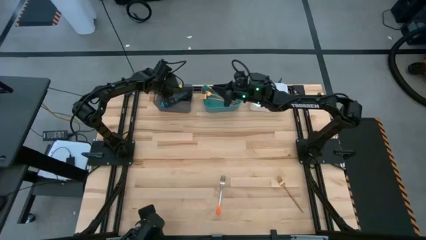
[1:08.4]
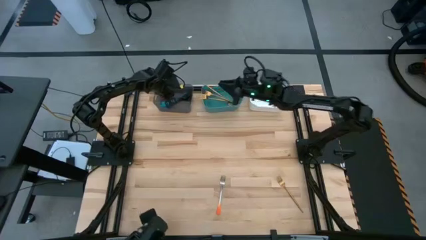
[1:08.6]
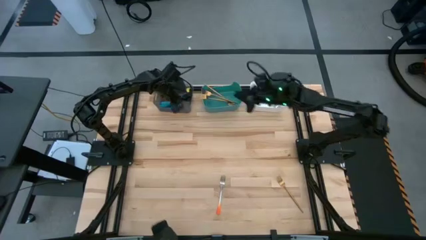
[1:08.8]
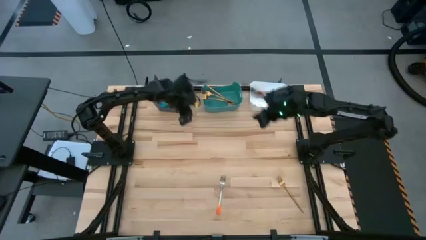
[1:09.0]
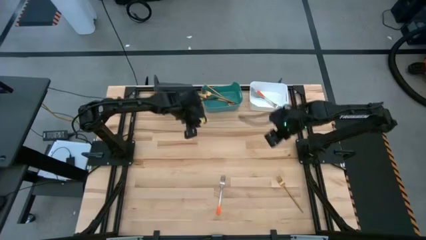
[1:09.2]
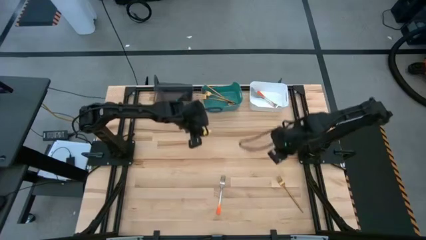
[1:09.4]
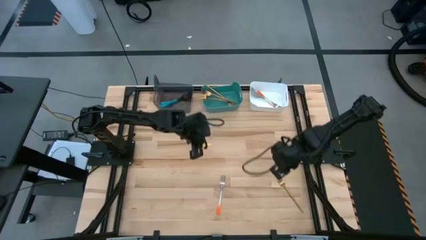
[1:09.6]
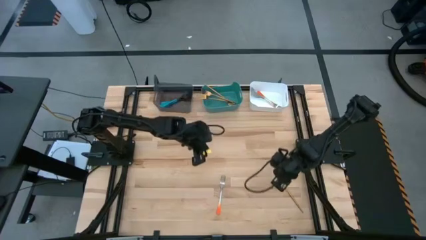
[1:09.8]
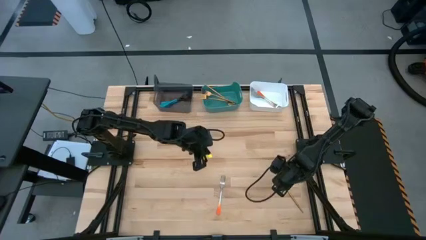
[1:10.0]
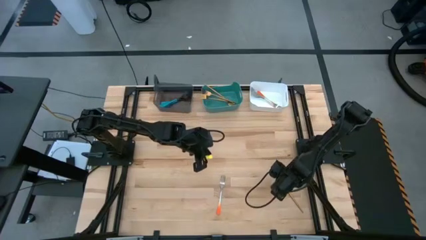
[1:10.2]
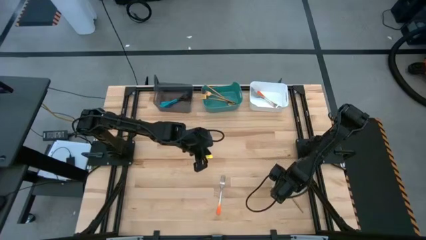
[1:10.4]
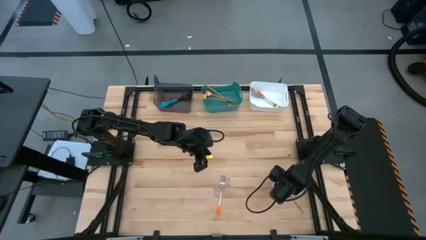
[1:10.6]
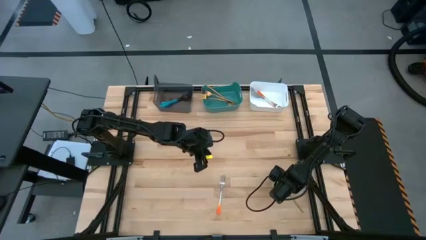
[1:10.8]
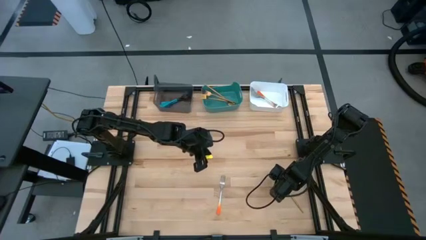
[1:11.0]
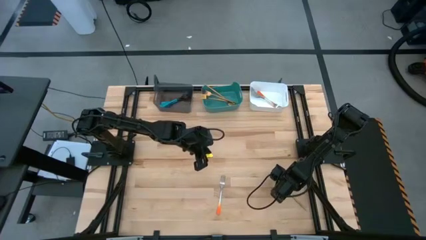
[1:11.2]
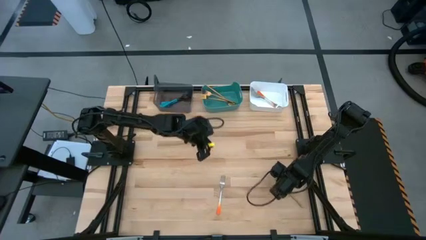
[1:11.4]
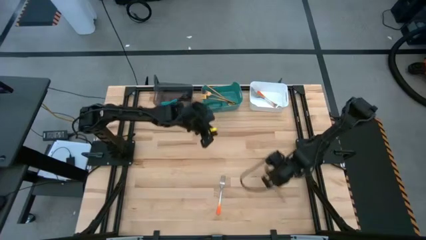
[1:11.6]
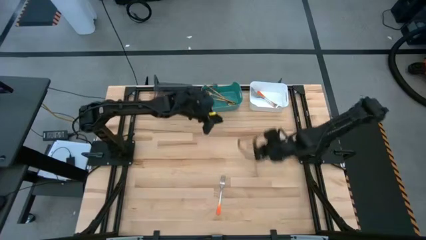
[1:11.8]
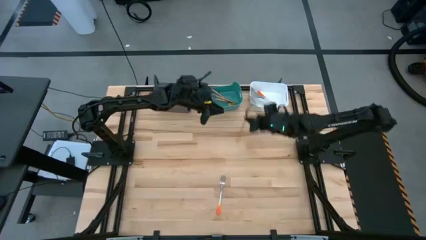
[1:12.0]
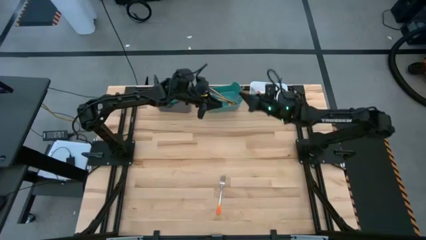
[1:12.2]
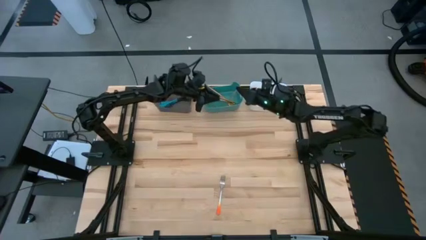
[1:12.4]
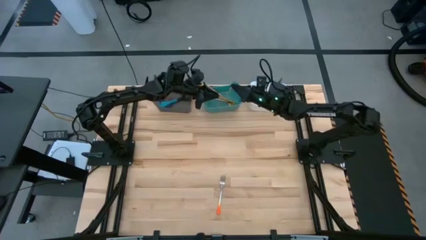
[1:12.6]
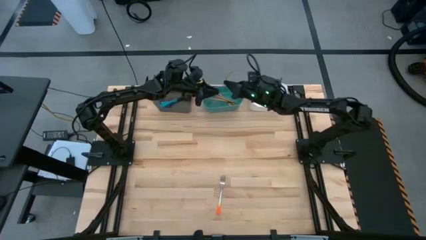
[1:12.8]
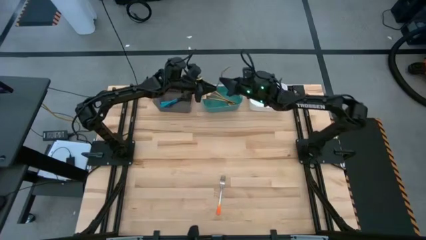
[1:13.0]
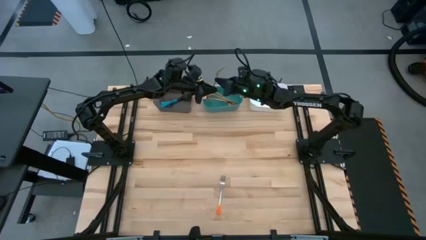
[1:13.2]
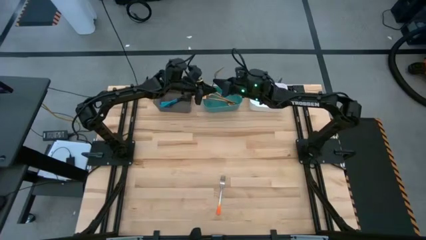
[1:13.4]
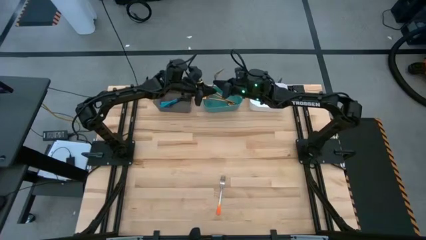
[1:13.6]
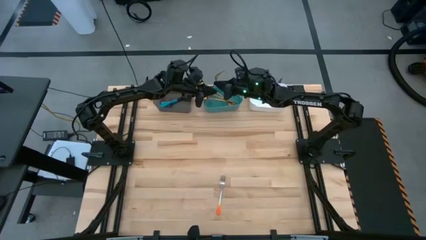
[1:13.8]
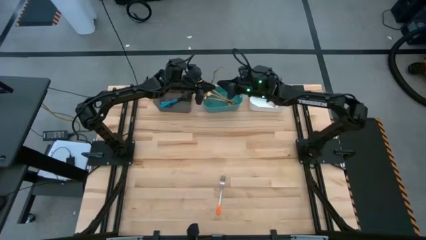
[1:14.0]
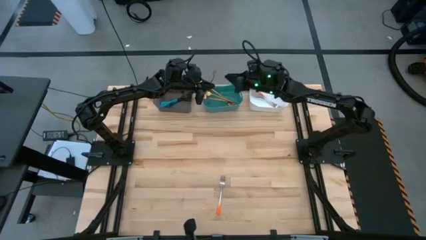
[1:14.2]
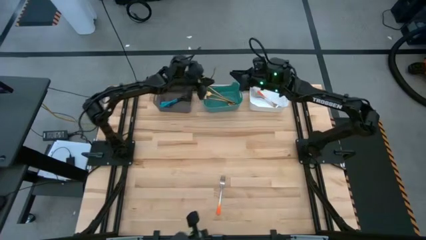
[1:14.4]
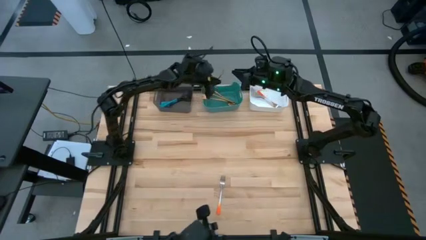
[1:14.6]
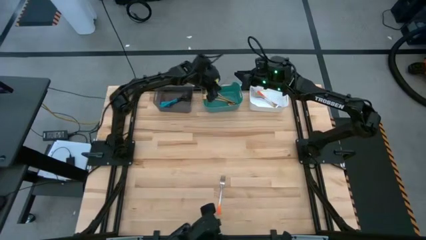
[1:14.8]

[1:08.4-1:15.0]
Task: Sort silverware by color (type)
Put the gold fork into the green bin

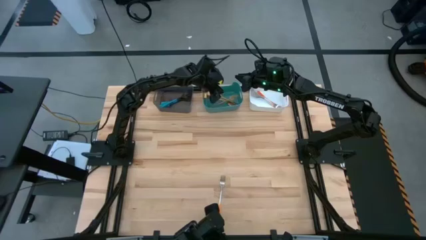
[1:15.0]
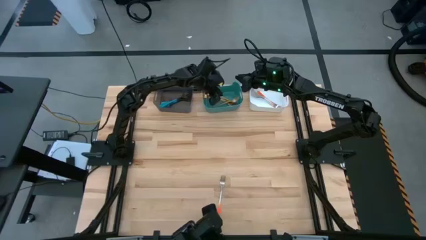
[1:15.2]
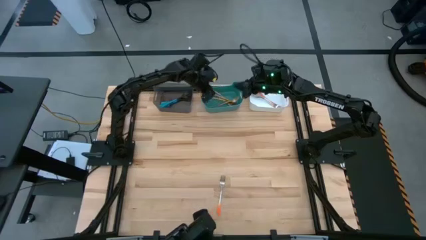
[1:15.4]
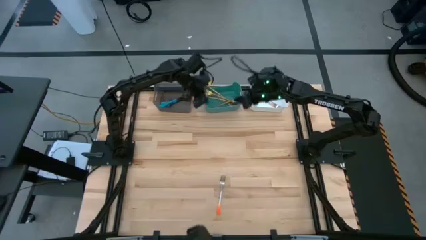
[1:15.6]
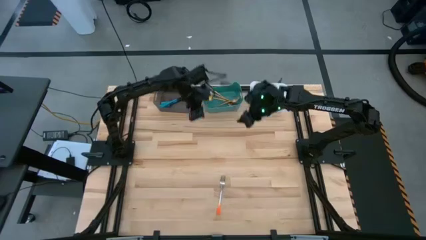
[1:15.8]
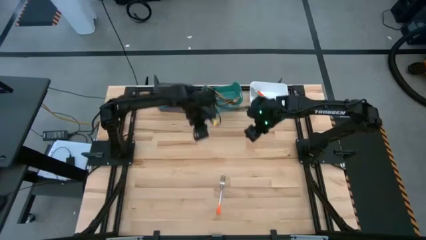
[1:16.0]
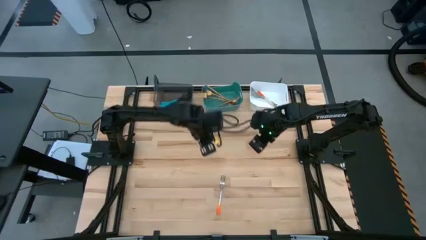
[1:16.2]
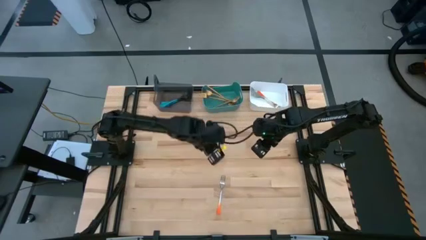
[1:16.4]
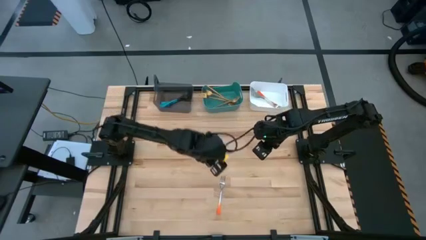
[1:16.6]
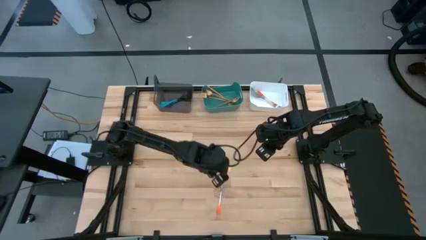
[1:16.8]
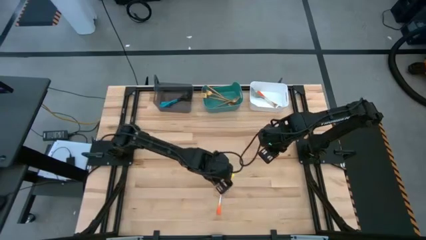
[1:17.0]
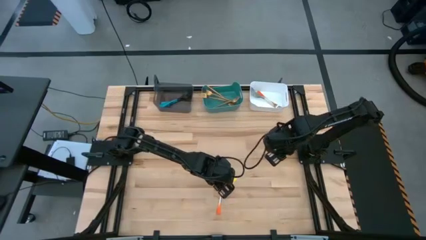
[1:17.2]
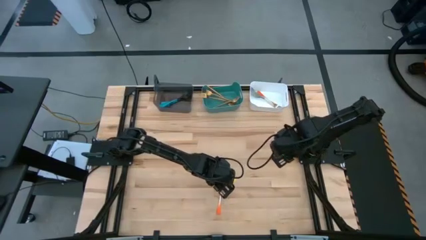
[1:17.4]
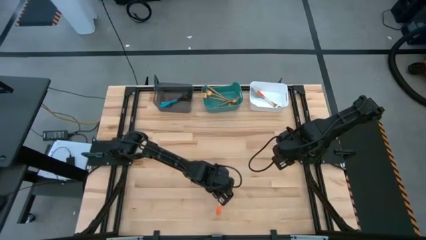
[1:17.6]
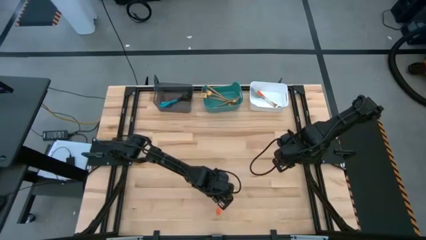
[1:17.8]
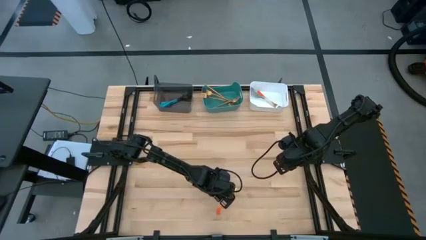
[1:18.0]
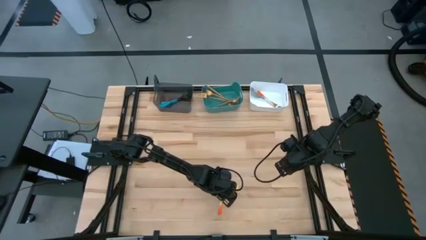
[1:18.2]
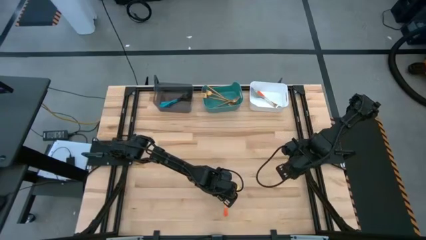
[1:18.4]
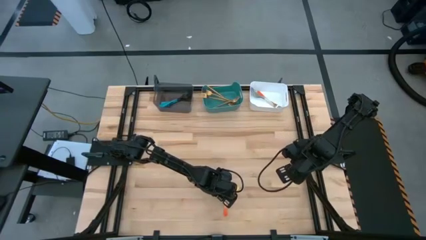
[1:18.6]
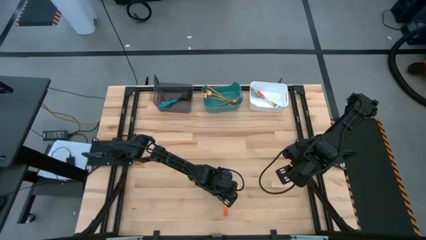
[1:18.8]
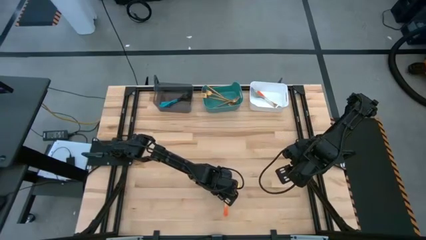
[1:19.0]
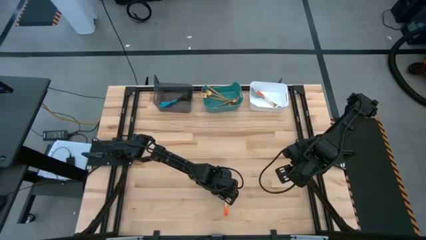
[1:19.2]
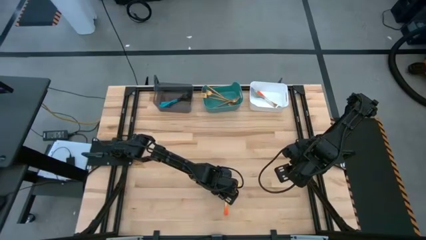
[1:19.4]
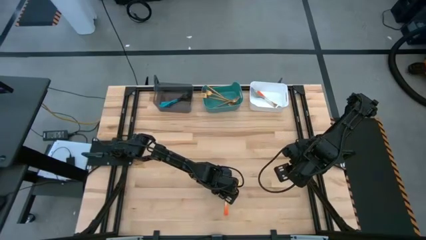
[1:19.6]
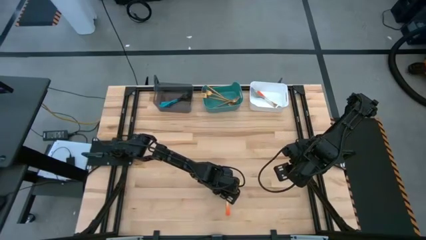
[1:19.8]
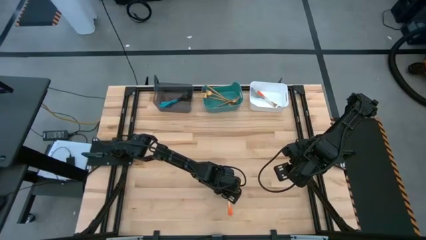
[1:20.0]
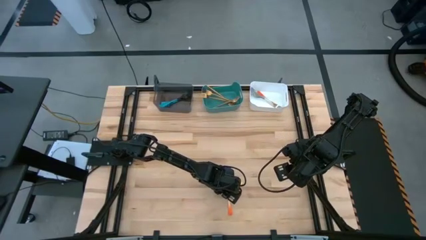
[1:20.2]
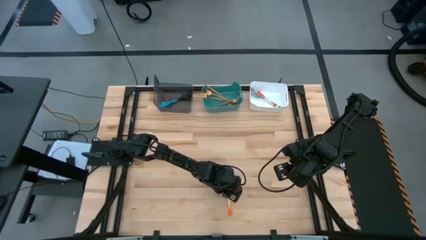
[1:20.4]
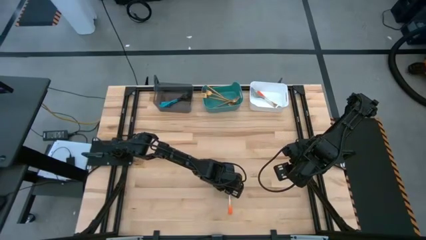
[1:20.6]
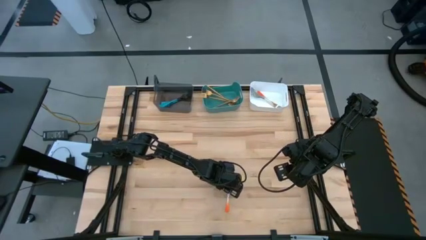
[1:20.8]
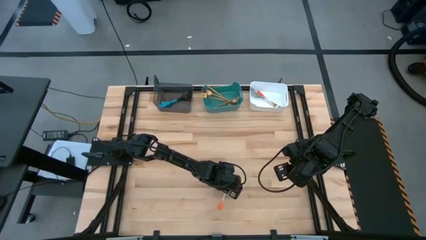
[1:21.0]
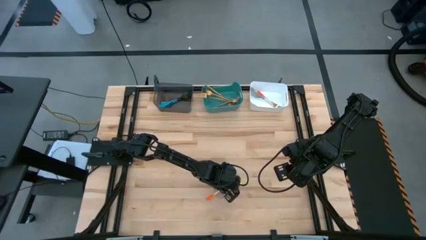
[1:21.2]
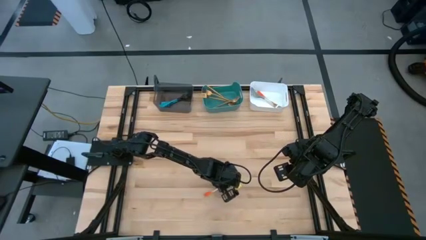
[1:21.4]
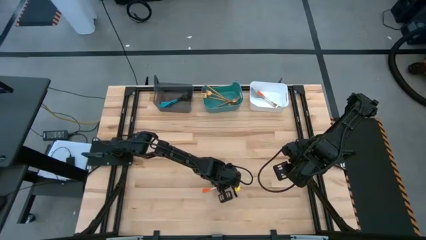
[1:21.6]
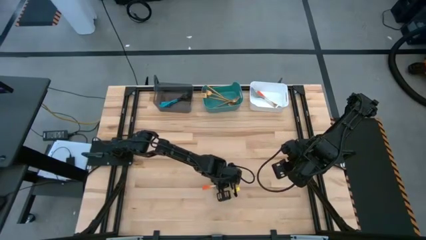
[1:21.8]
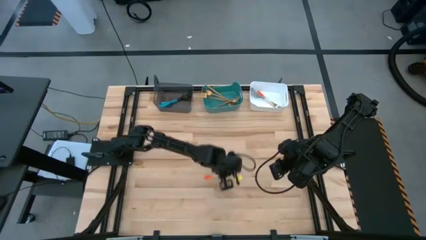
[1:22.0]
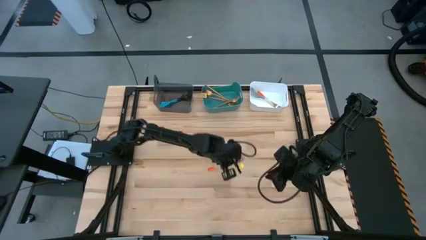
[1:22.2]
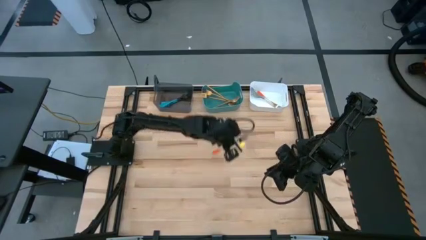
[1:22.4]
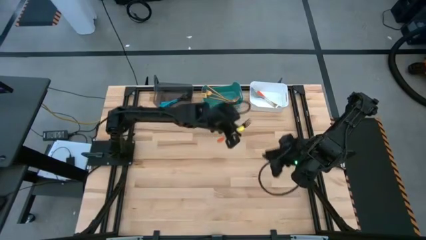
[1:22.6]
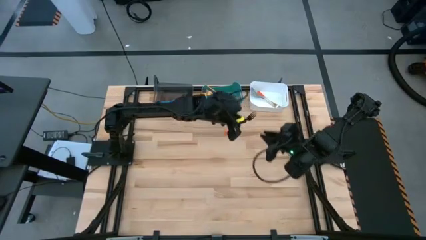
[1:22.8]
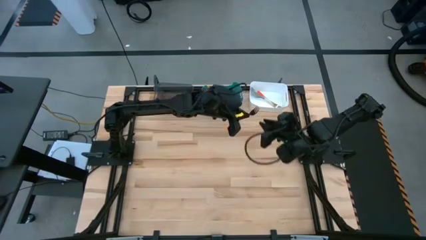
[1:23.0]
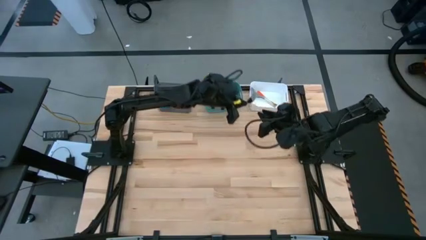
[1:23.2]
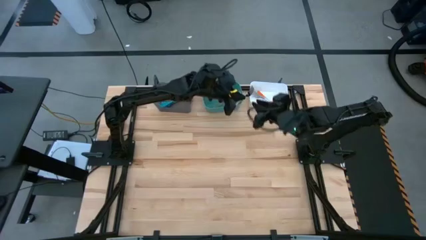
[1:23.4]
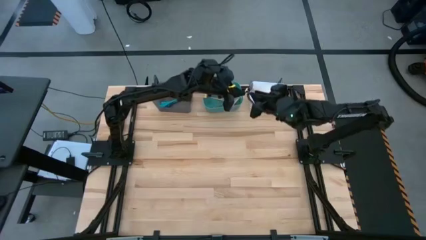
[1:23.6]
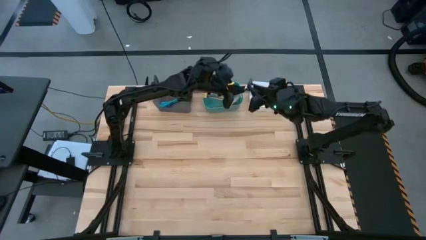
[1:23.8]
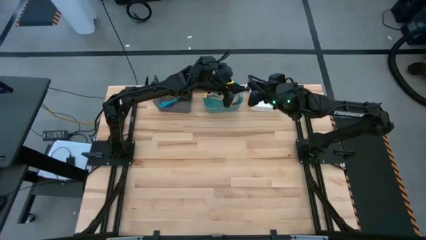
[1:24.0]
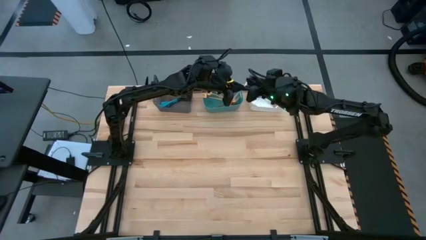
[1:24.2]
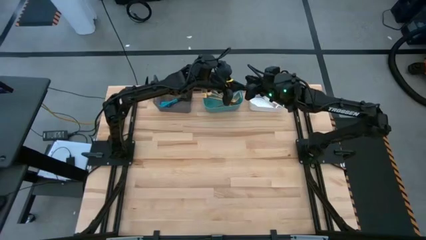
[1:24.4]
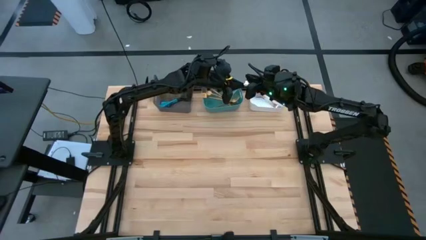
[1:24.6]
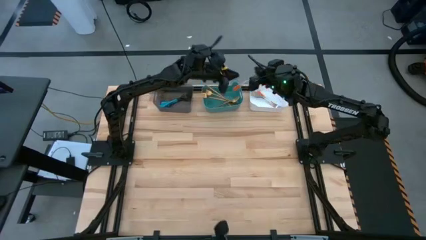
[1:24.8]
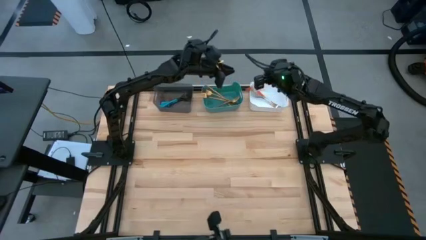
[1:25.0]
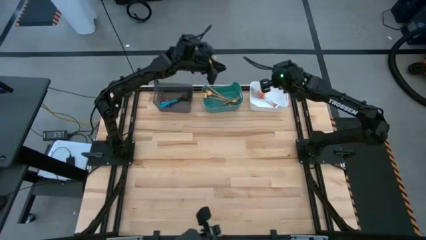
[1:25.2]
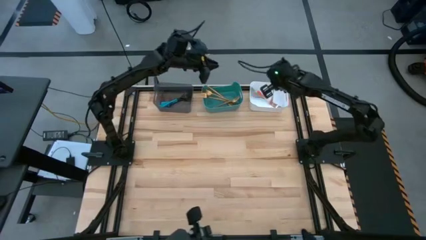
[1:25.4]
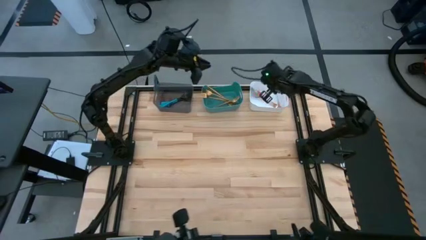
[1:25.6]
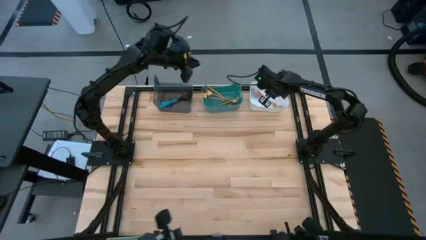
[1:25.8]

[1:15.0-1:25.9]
Put the orange fork into the white bin
